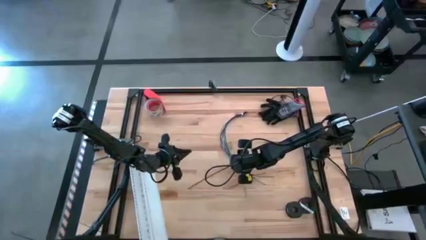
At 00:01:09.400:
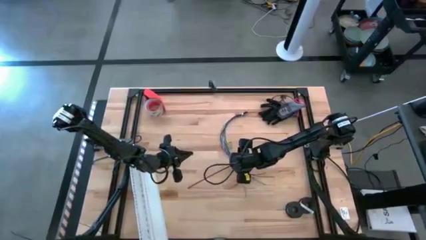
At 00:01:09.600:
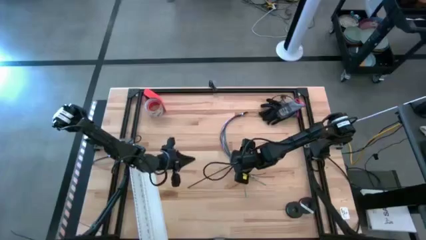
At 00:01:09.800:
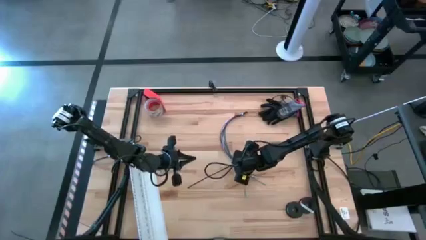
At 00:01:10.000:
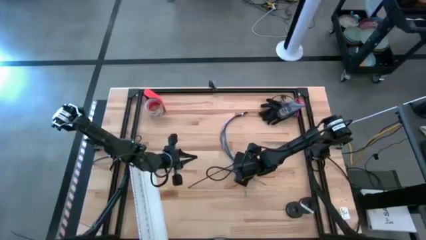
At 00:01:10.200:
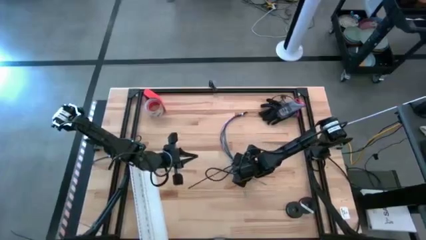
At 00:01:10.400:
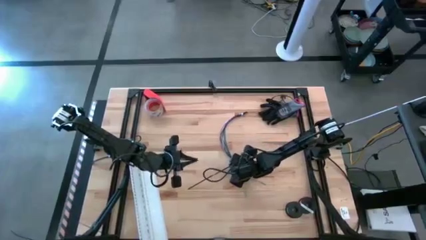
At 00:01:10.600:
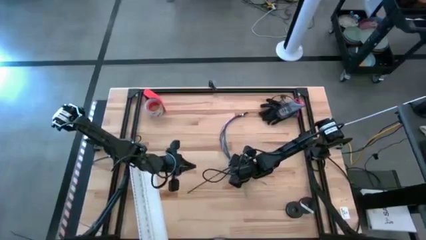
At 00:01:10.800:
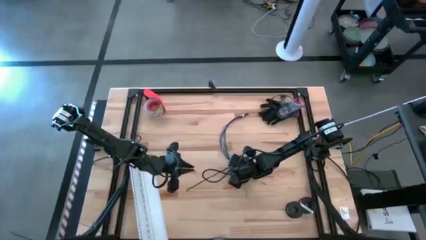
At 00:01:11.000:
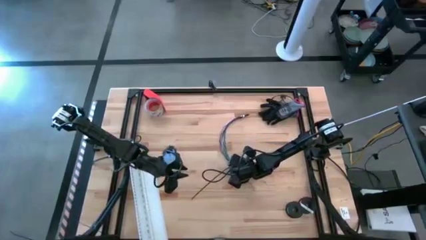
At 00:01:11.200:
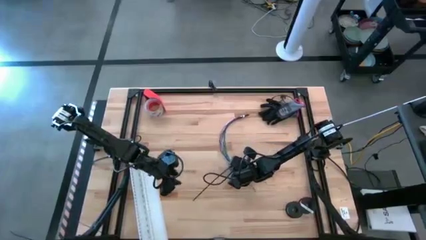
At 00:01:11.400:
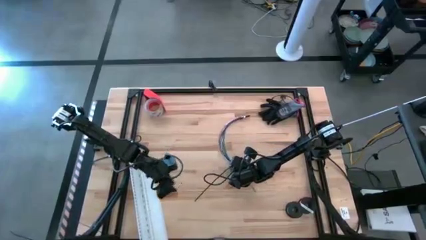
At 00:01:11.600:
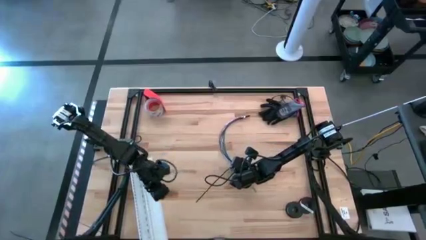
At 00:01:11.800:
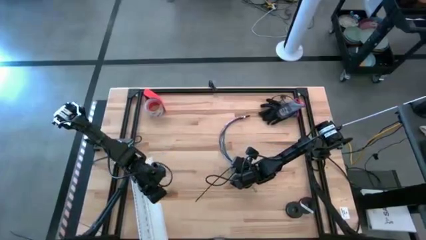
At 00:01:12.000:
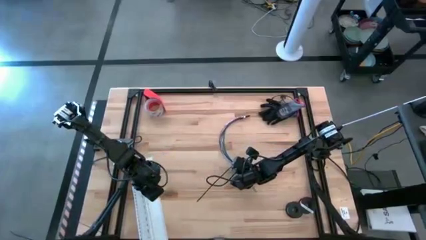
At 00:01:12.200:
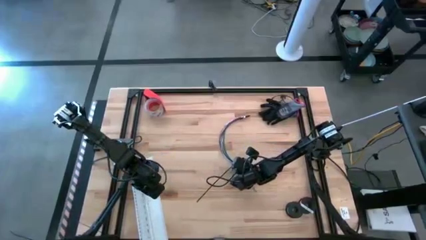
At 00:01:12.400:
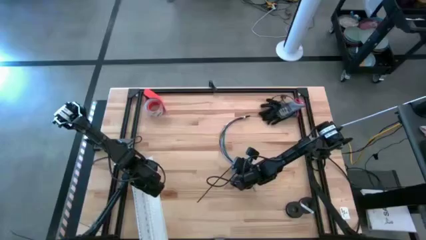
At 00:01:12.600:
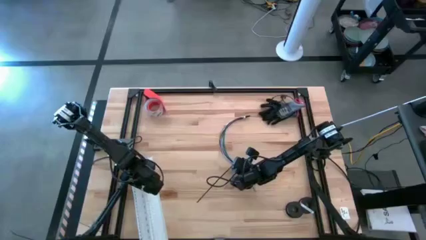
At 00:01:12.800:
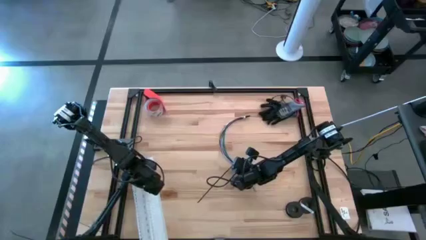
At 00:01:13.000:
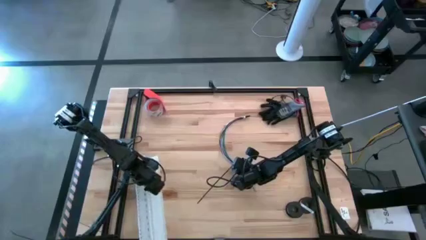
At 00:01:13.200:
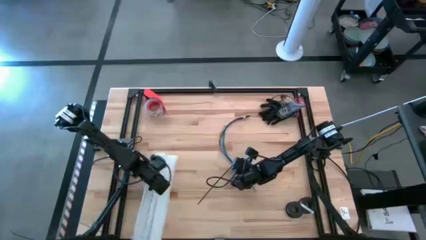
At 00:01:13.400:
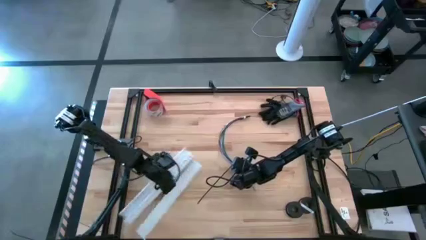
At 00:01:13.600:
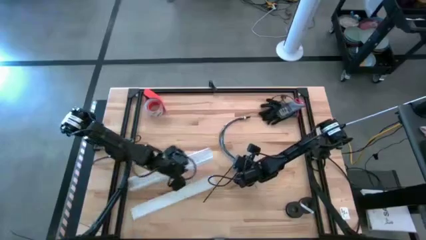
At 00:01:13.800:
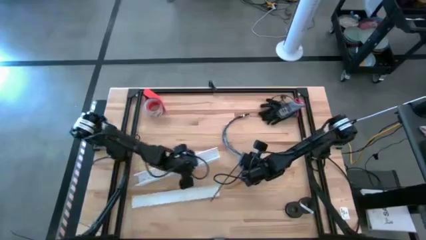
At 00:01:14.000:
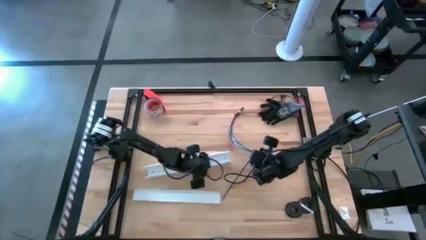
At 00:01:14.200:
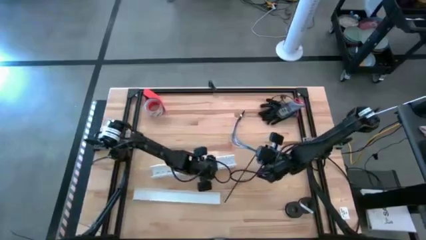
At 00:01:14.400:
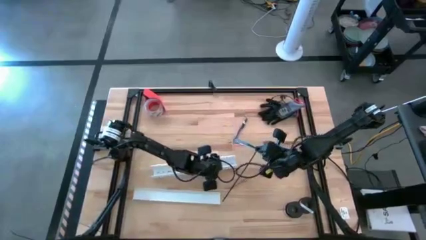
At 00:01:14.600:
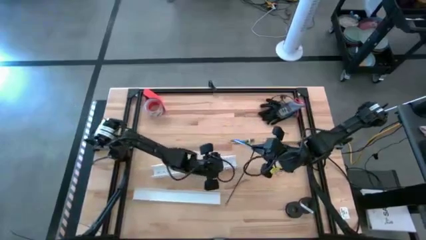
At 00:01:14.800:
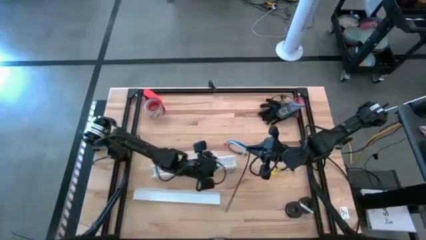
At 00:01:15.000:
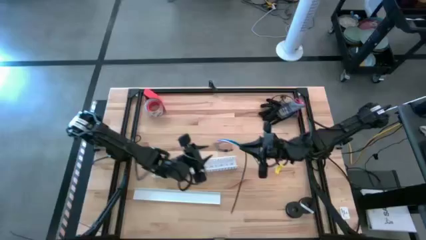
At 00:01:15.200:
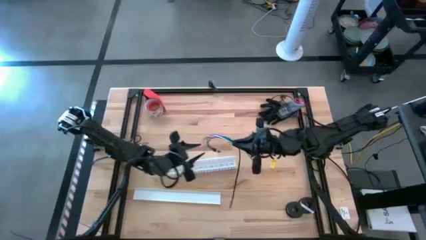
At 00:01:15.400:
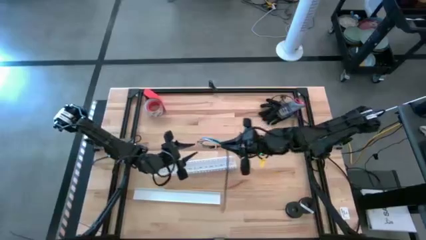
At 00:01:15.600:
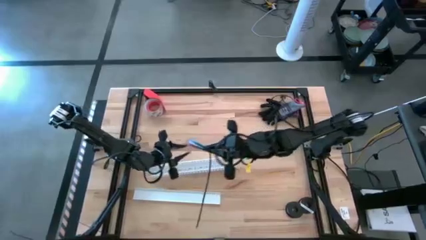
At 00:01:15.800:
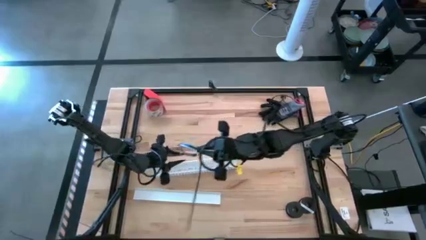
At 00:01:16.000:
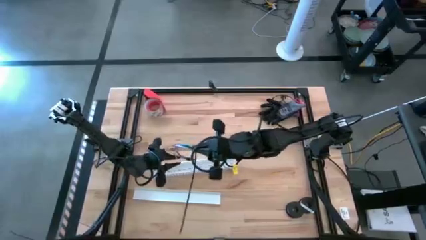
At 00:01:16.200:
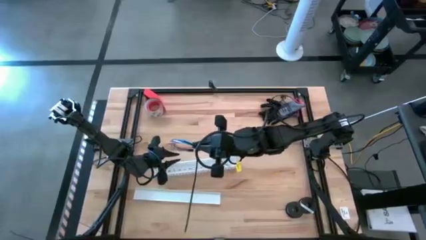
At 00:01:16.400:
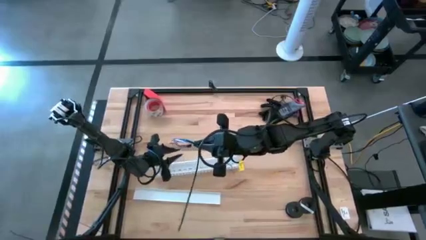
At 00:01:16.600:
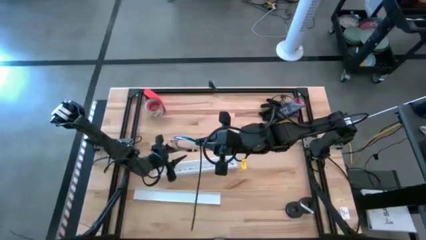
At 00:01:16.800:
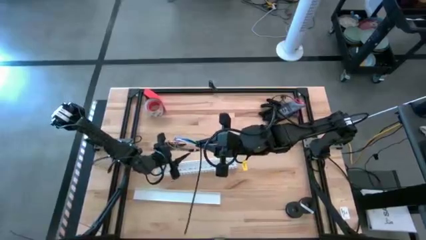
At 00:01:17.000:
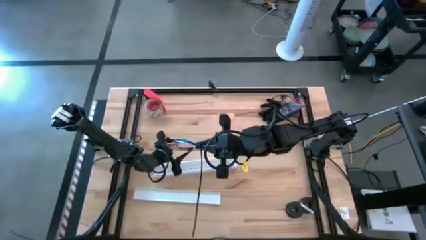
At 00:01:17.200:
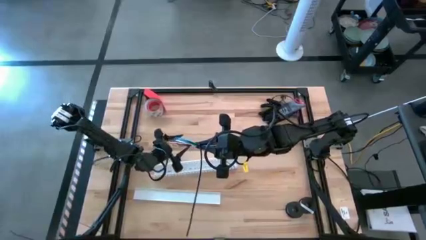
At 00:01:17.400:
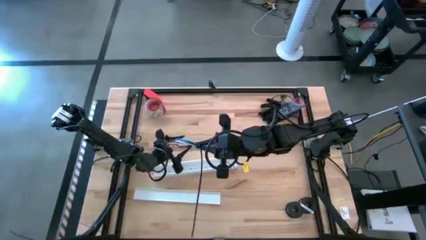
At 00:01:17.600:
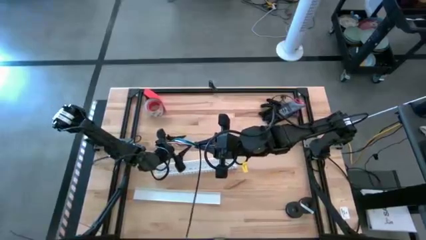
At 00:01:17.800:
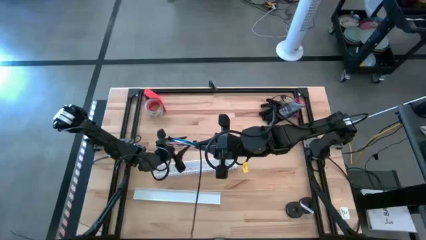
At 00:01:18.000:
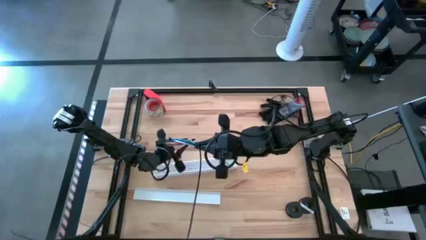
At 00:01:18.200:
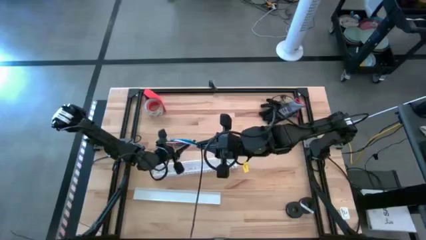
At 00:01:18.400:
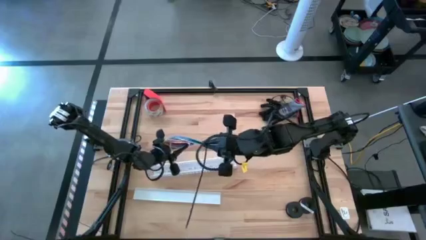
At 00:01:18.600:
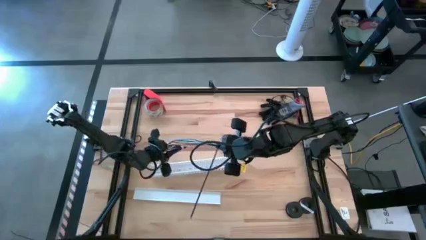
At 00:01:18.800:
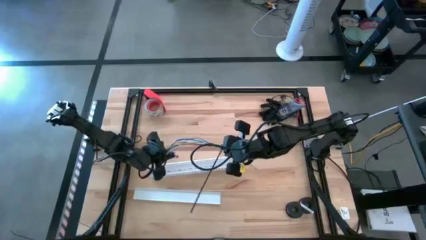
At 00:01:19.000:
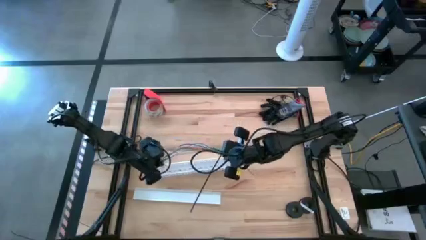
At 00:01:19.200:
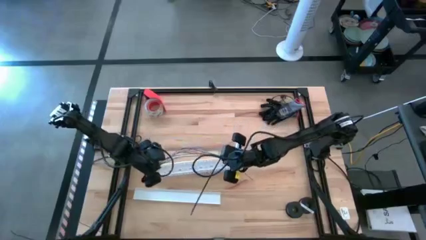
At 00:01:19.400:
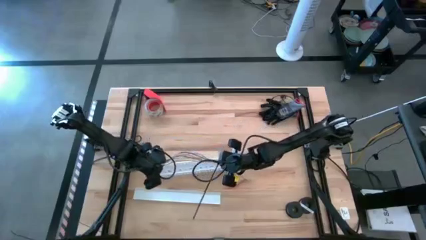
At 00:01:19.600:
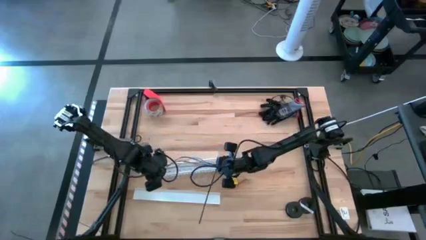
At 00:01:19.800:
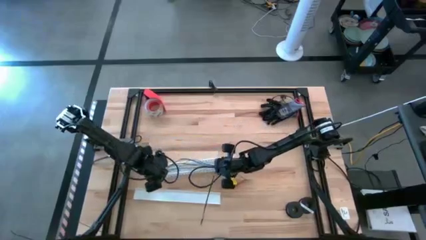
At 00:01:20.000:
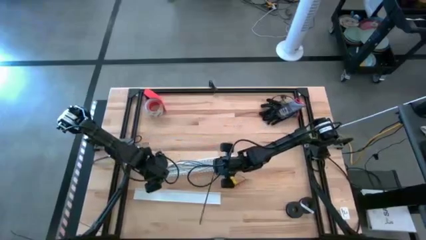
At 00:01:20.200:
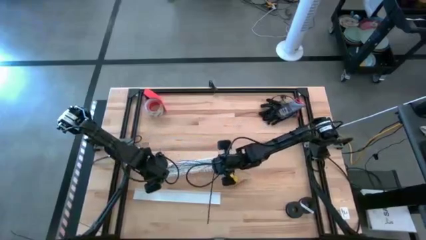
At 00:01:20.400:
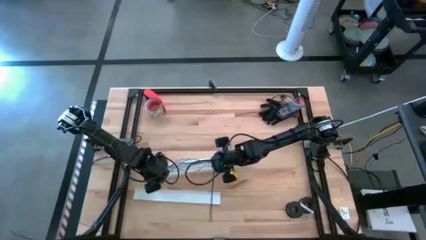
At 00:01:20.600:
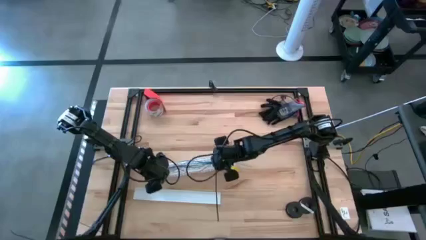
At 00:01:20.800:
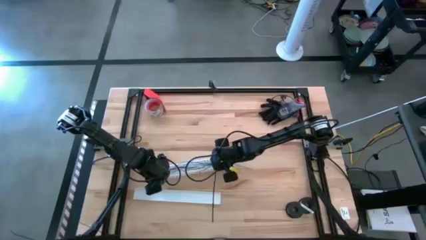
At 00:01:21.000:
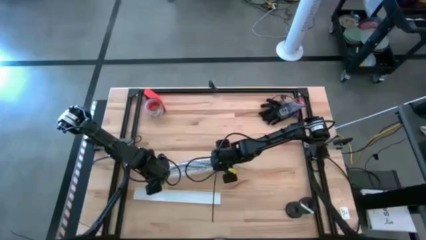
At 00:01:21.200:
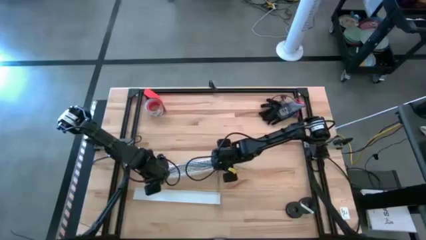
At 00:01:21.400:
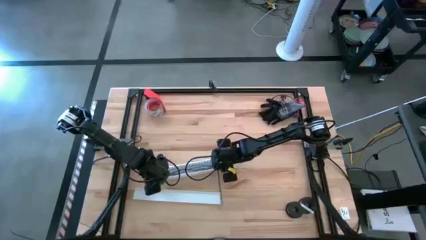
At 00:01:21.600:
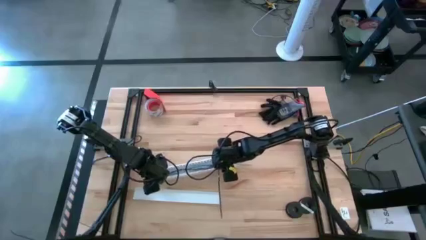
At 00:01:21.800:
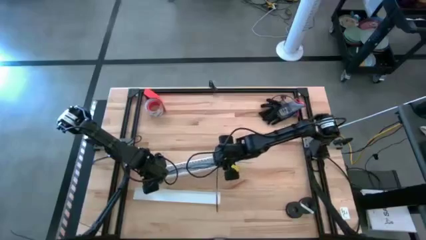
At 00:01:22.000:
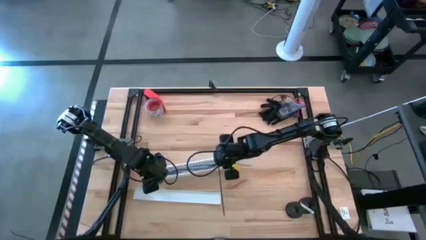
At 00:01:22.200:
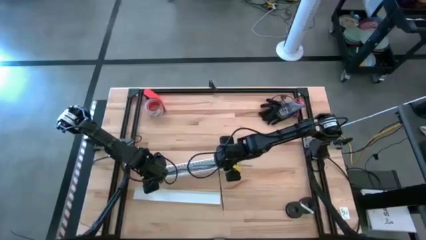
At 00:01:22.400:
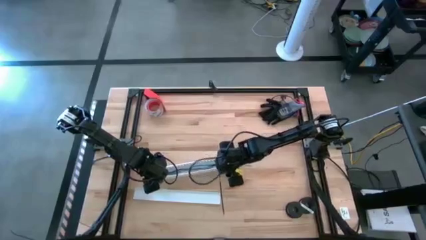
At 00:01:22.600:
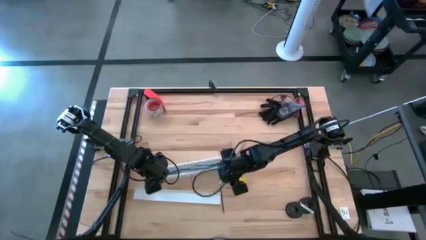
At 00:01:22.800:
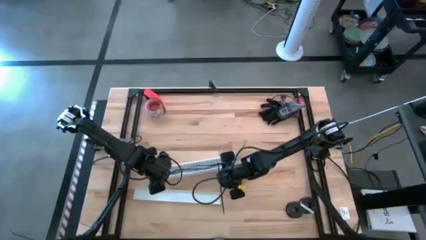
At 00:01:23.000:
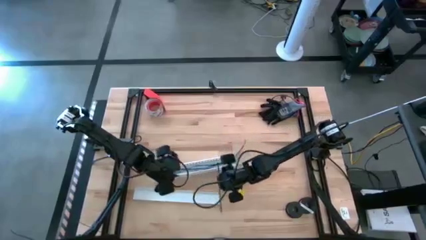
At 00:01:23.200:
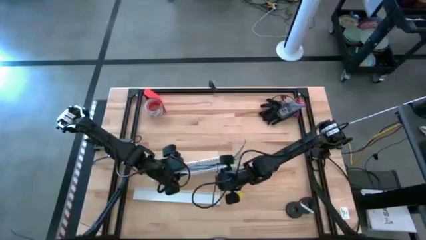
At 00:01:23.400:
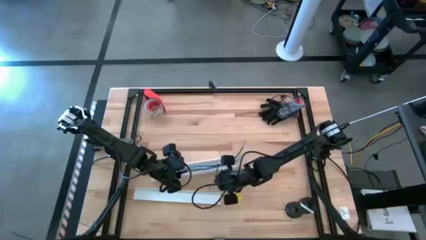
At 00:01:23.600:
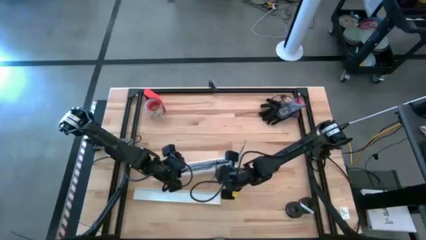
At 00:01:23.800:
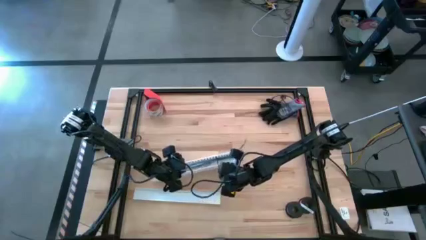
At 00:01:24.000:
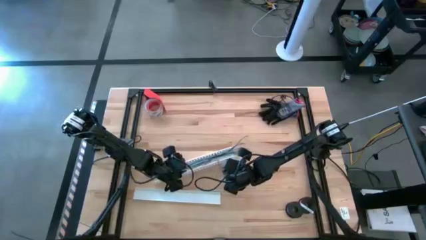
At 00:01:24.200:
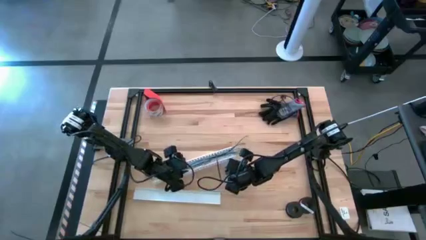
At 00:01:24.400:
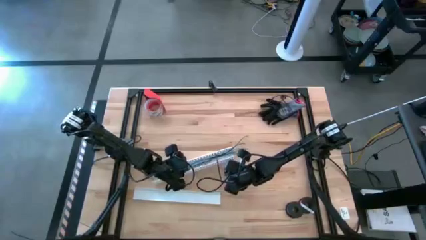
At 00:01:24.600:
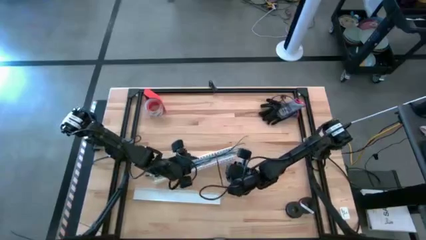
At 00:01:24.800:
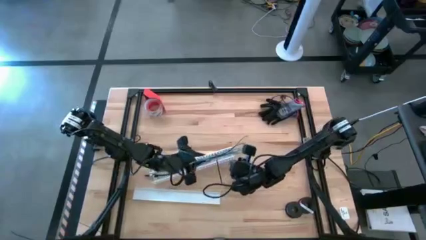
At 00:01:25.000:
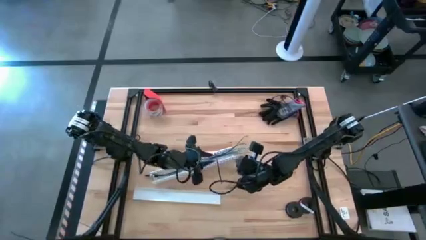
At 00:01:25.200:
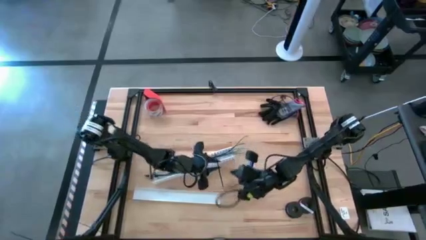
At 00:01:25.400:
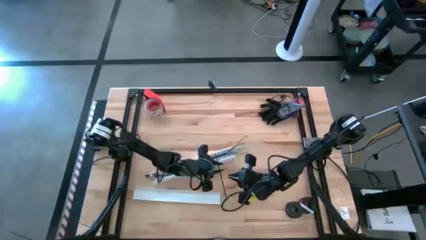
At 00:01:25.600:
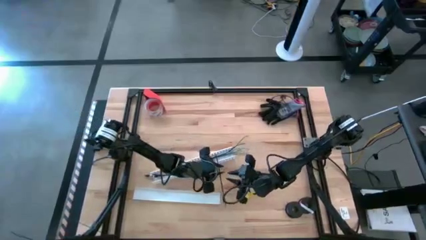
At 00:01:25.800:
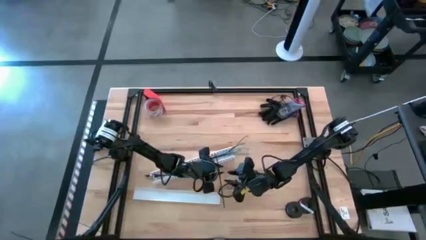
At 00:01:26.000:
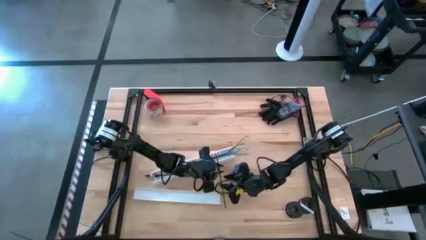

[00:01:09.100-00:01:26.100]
Task: Ziptie cables
Put the zip-tied cables in the cable duct
